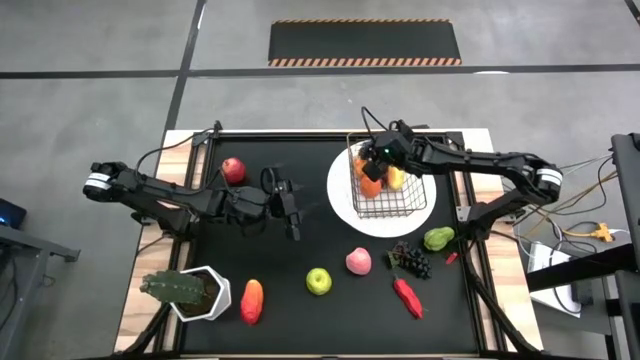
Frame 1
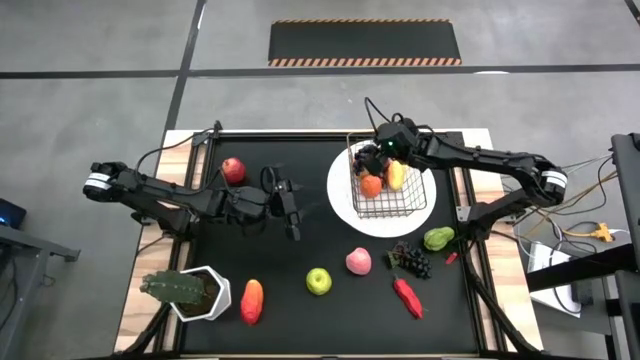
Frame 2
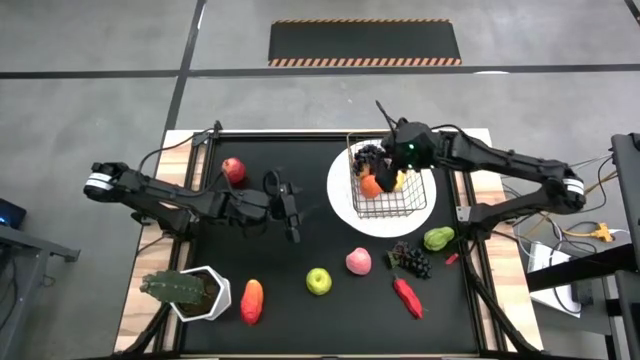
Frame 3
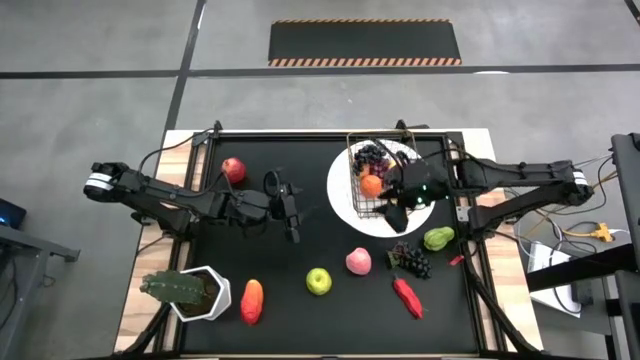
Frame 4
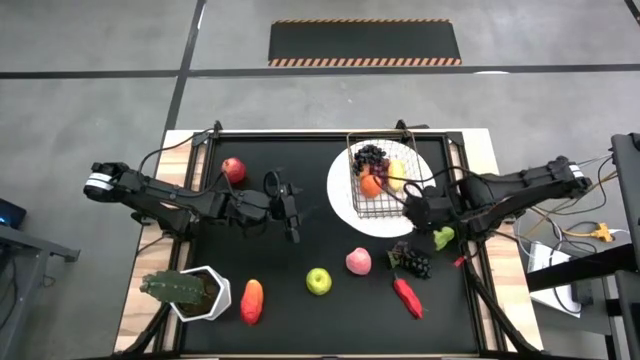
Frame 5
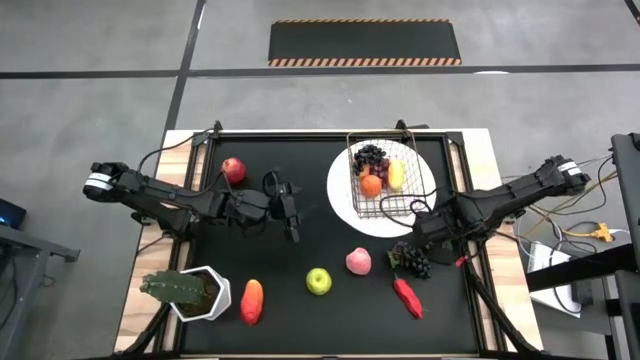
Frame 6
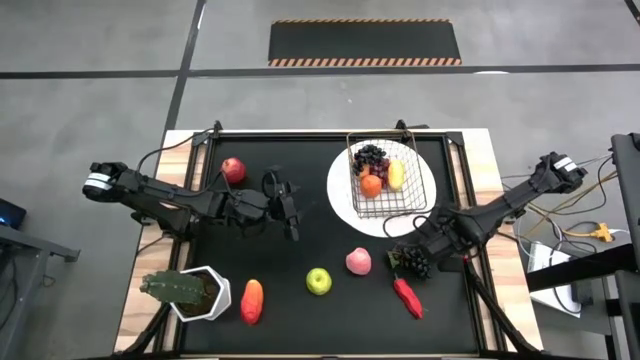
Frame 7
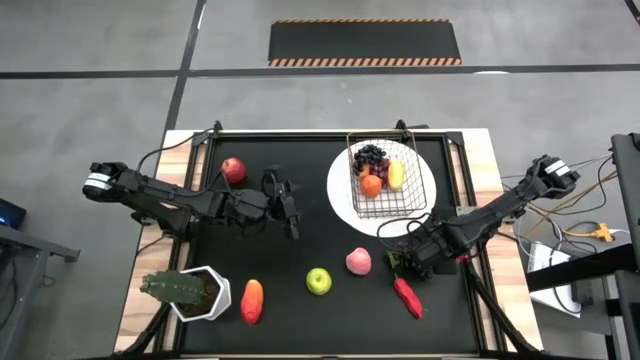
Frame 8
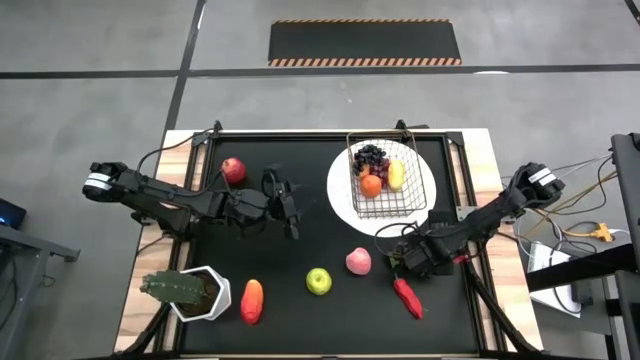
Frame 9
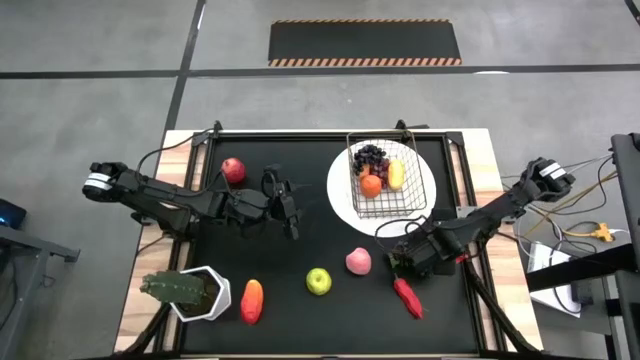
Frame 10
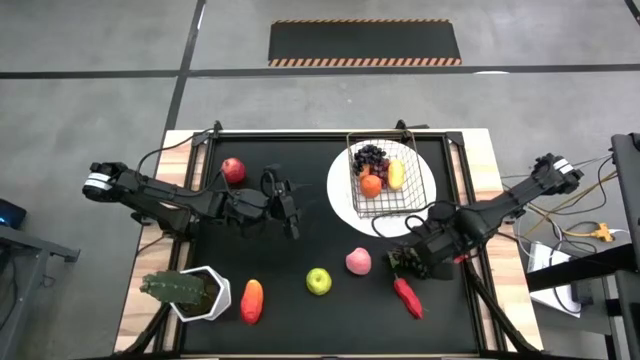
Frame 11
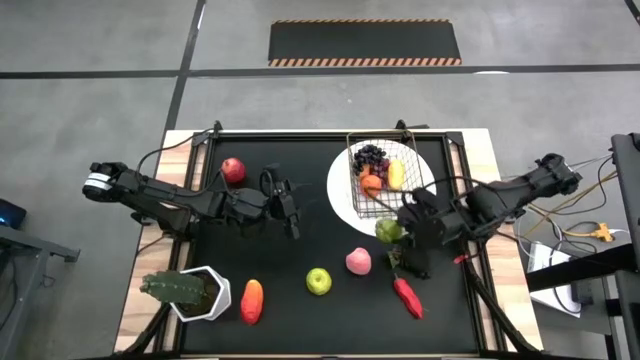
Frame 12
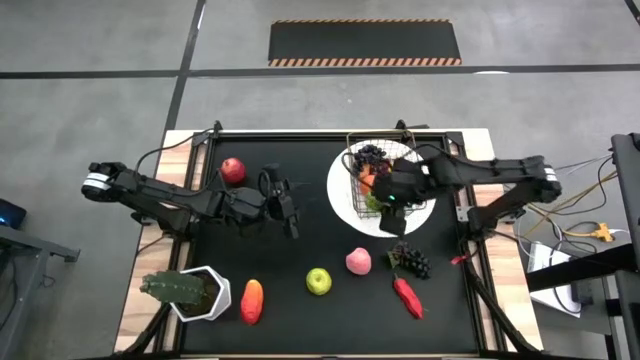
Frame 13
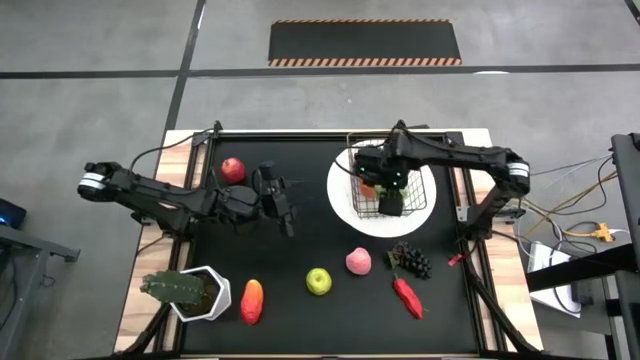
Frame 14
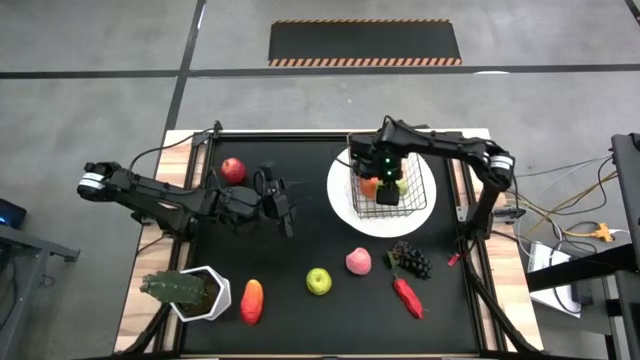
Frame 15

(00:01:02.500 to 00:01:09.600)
Task: Build produce basket
Put the green chayote into the wire basket

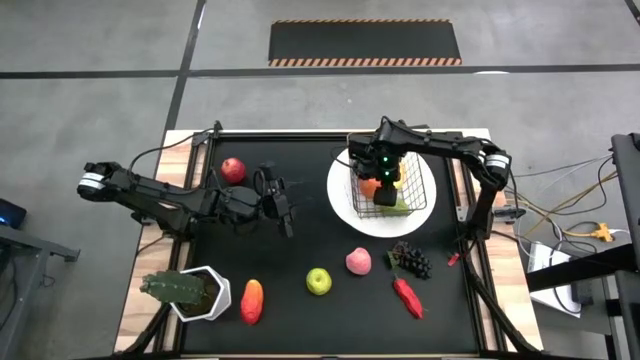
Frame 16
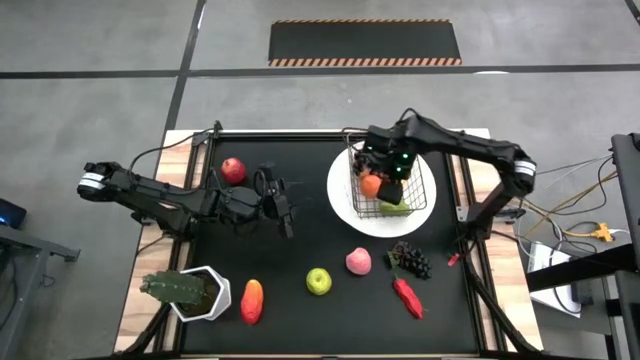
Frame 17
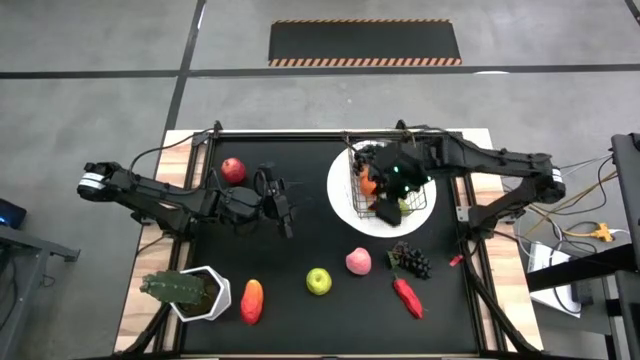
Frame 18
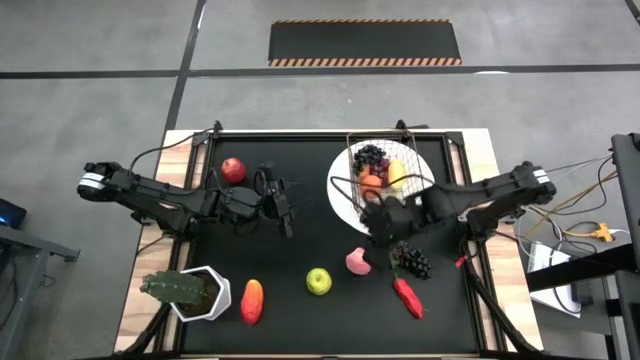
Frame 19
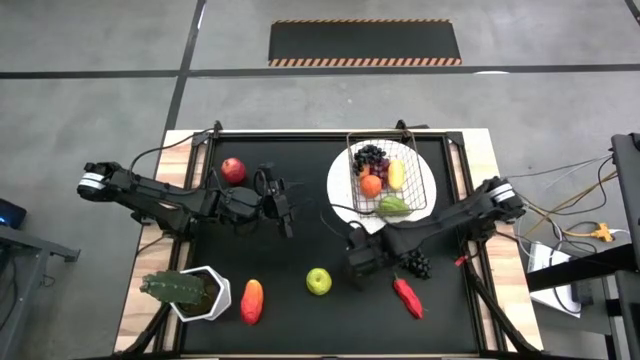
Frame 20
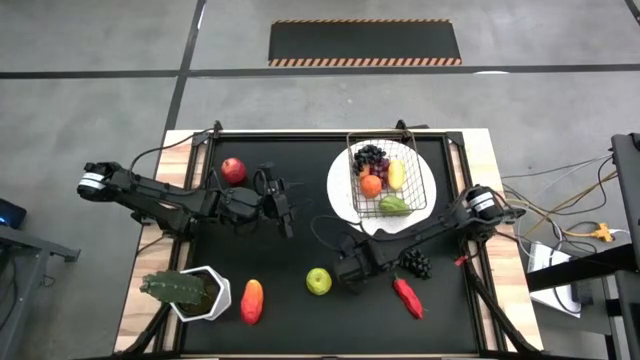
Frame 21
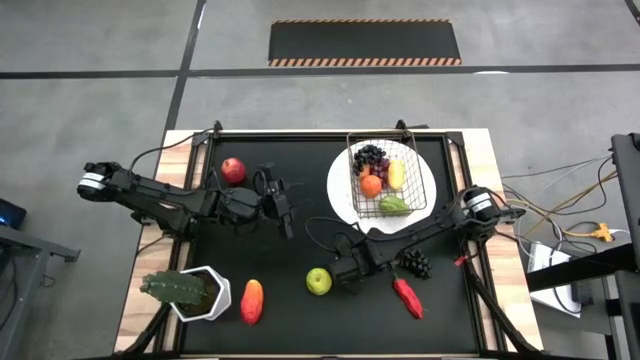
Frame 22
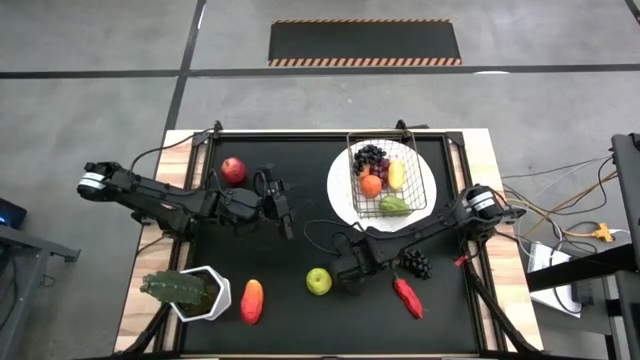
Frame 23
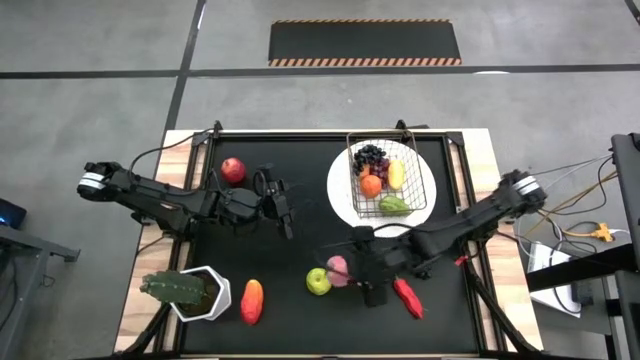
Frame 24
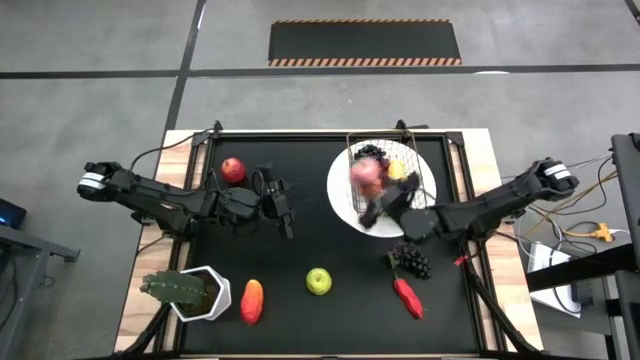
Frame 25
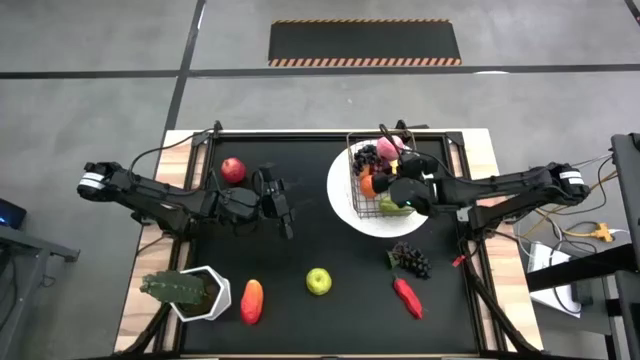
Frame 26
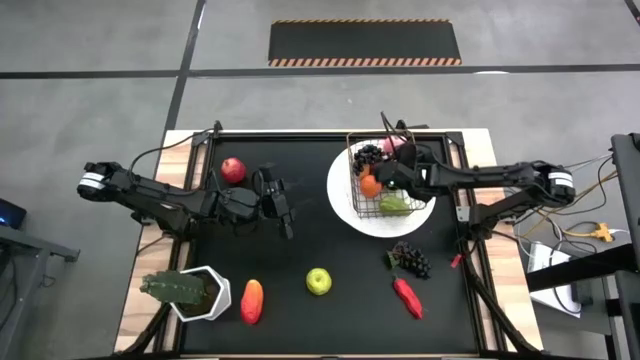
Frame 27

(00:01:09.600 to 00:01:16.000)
Put the pink peach into the wire basket

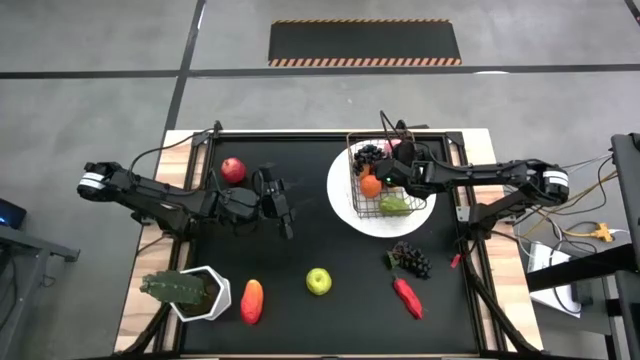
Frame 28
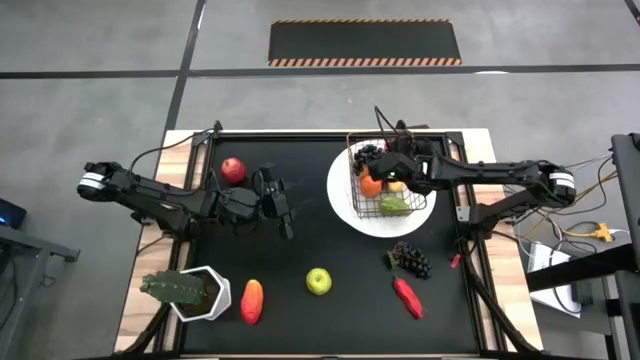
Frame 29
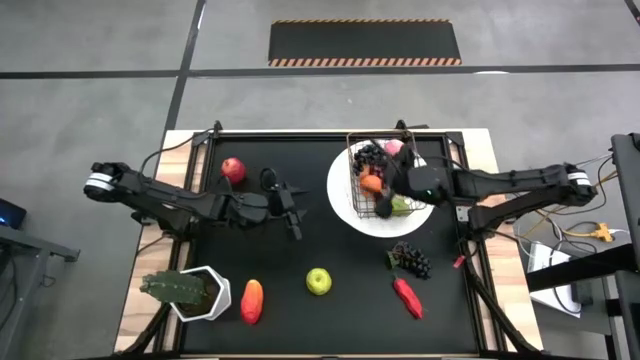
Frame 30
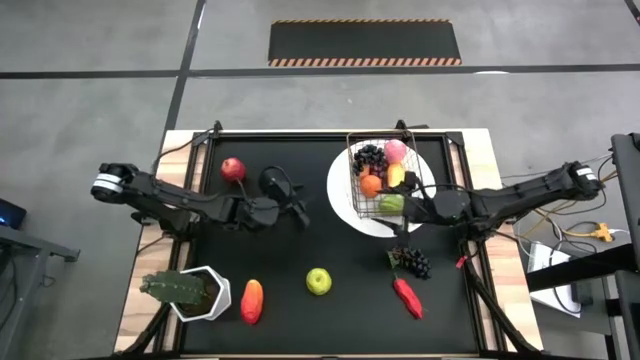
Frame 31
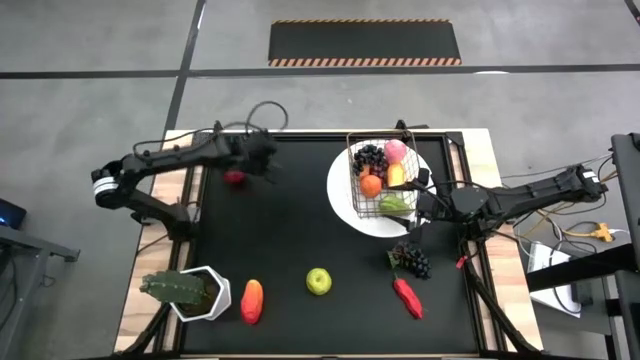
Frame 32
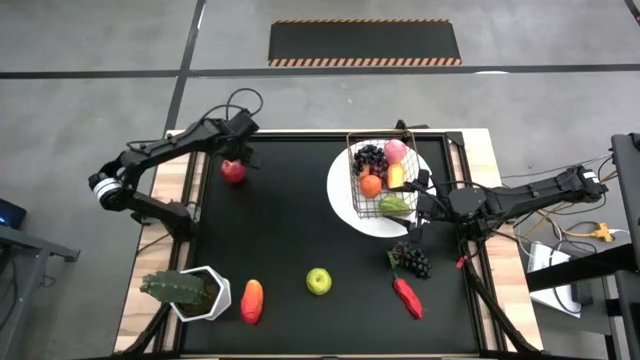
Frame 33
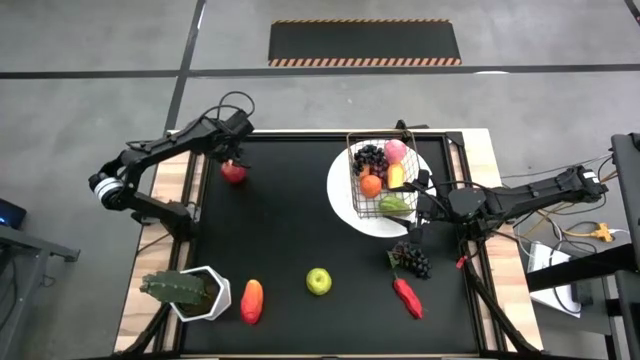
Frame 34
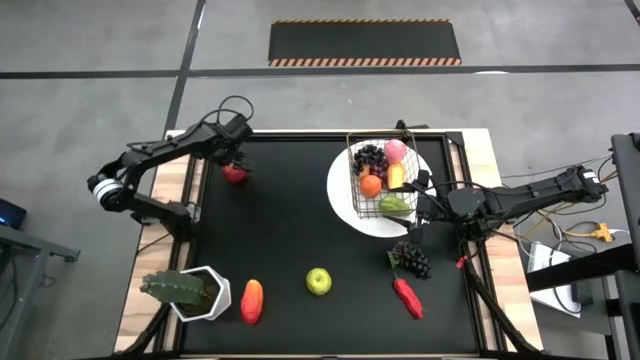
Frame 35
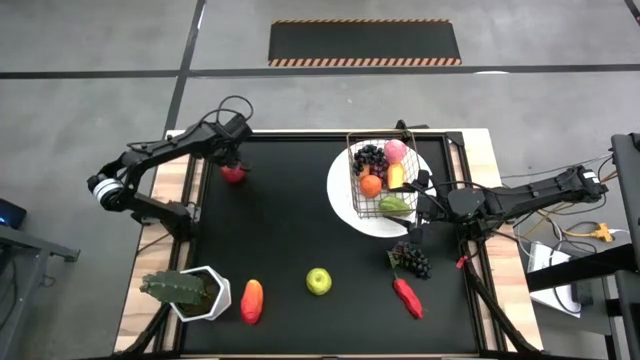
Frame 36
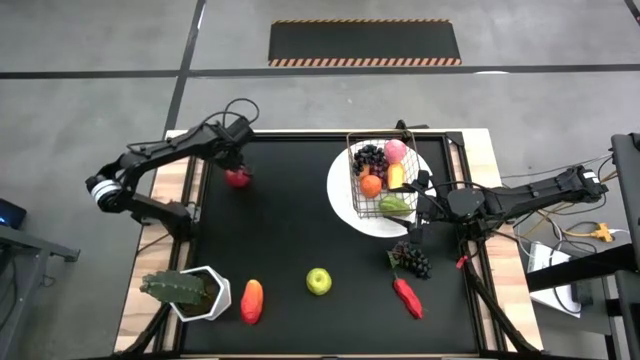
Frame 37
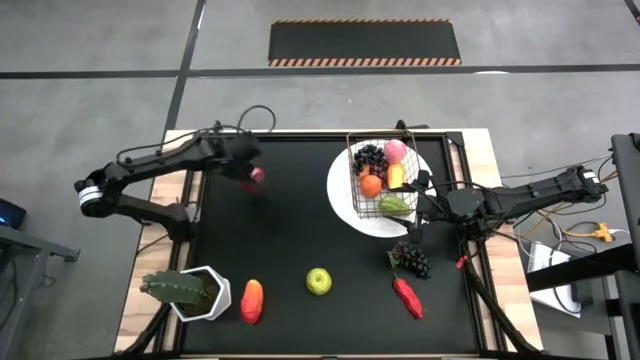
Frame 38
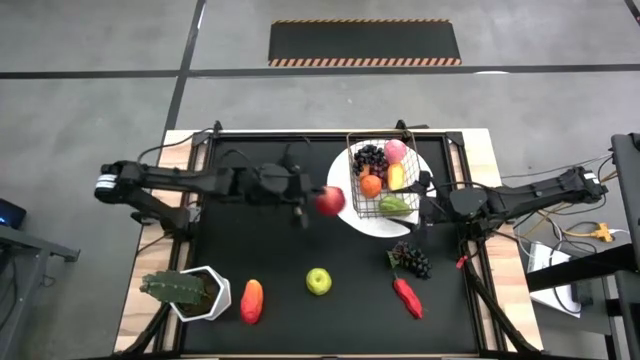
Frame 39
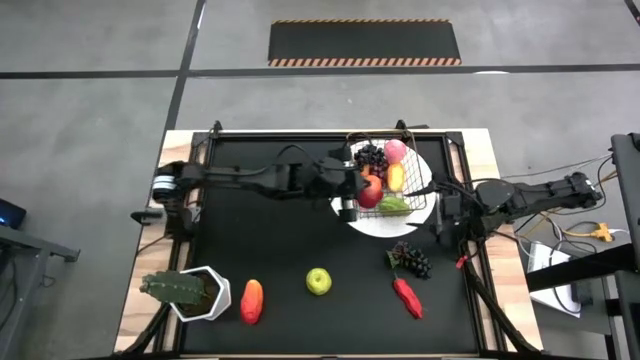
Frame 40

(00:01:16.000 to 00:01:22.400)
Put the red pomegranate into the wire basket

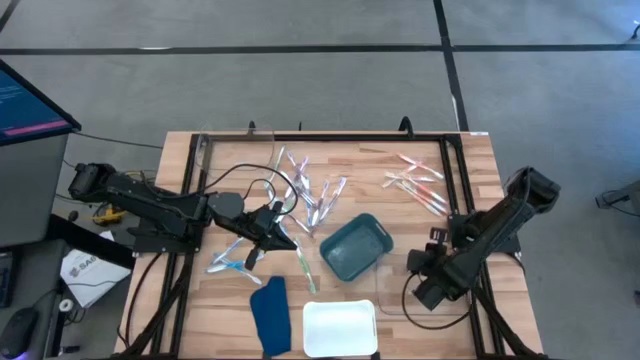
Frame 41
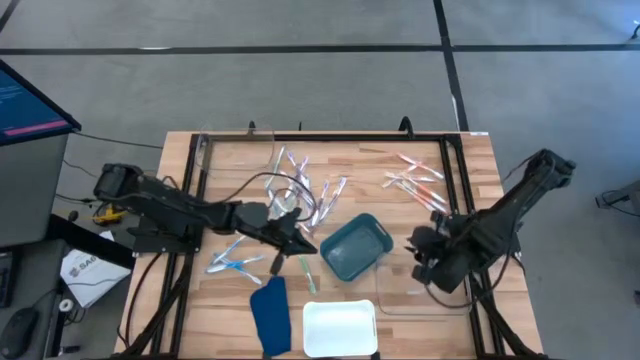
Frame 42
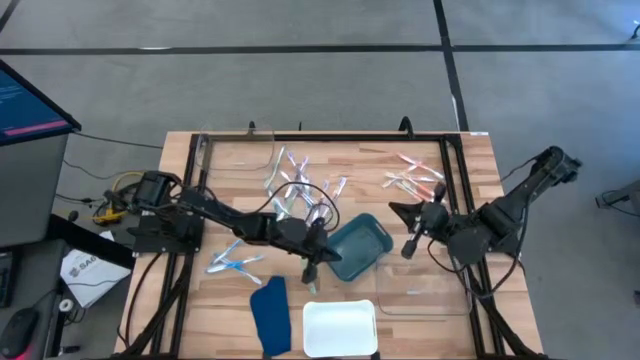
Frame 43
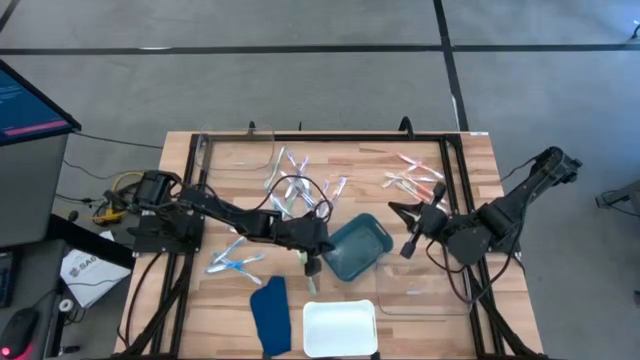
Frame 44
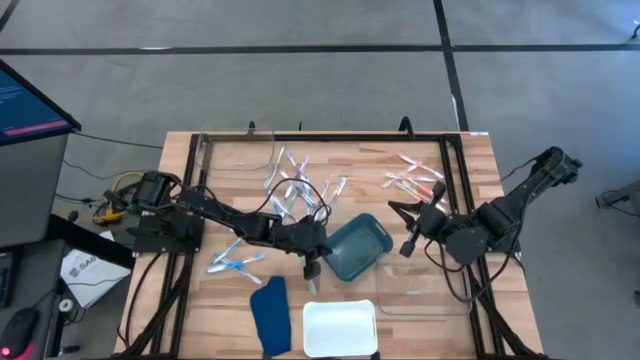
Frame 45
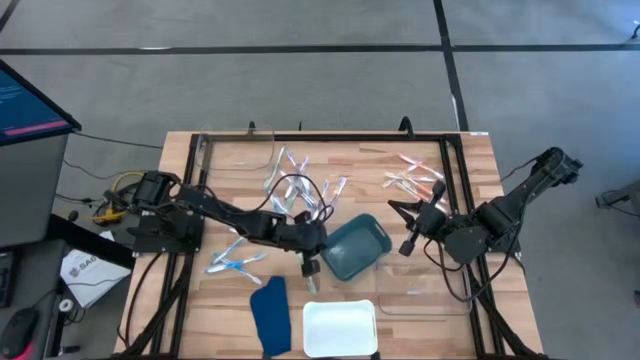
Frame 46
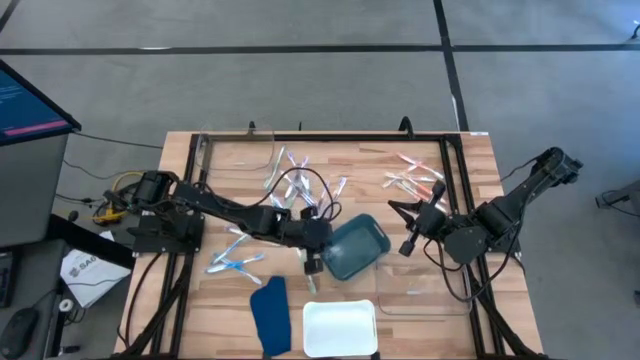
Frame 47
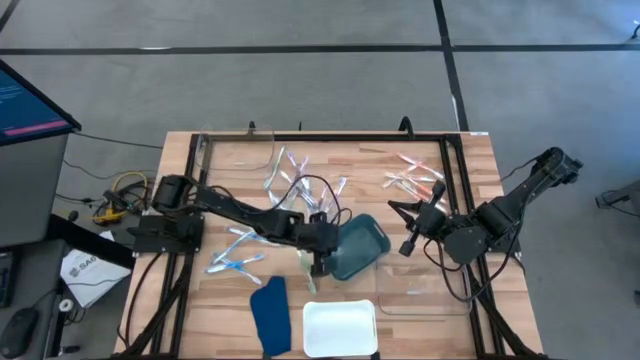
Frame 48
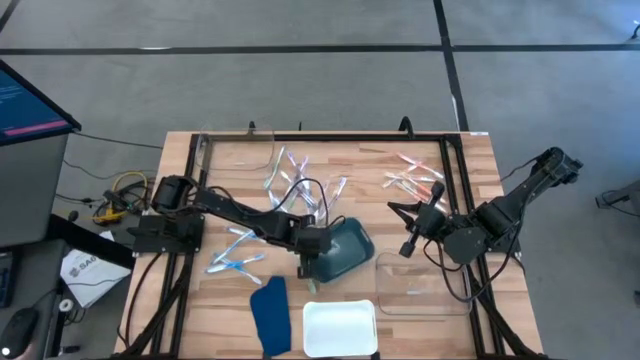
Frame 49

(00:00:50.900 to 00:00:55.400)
Task: Pick & Place Toothbrushes
Adjust the green bin
